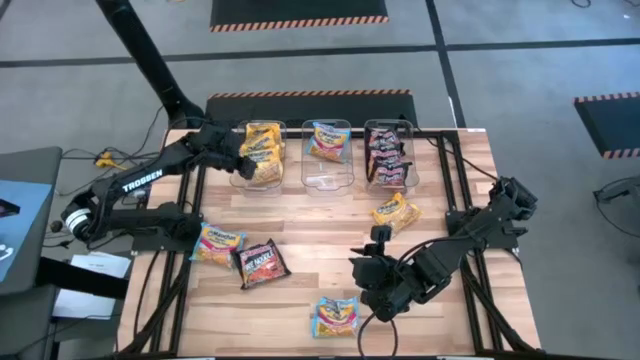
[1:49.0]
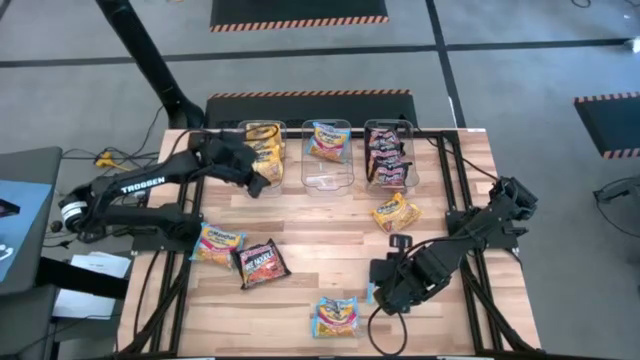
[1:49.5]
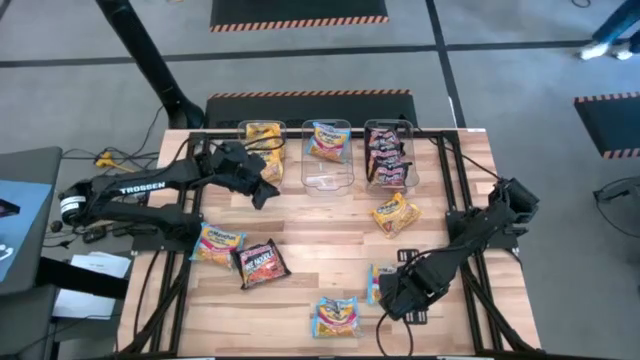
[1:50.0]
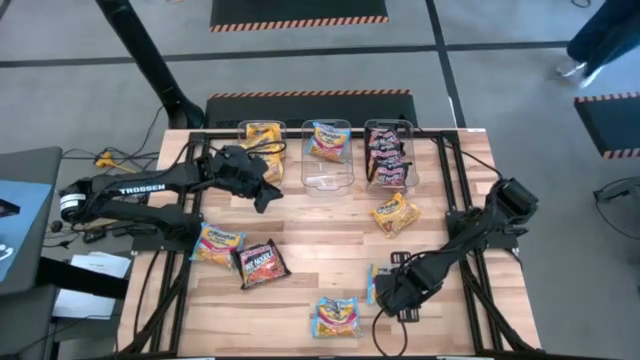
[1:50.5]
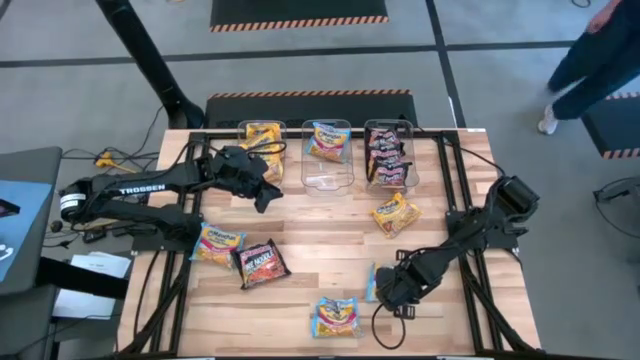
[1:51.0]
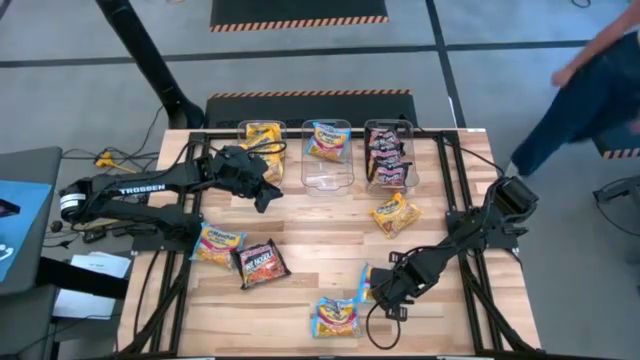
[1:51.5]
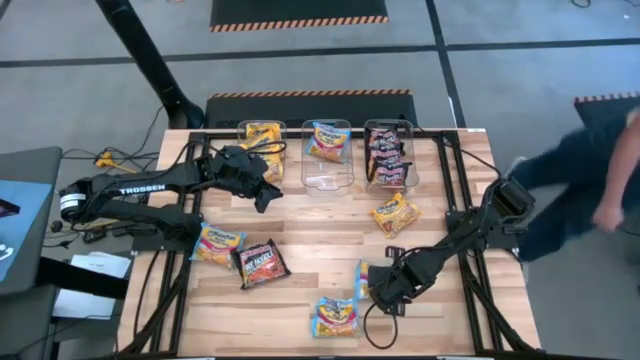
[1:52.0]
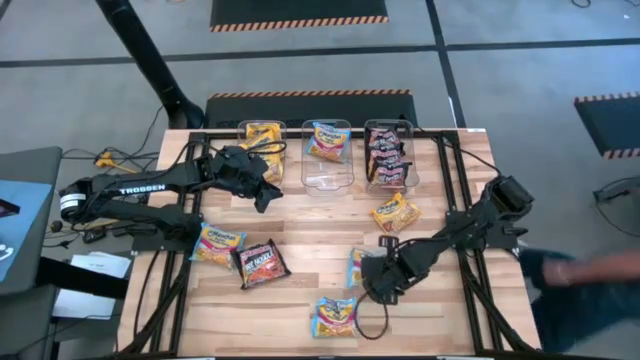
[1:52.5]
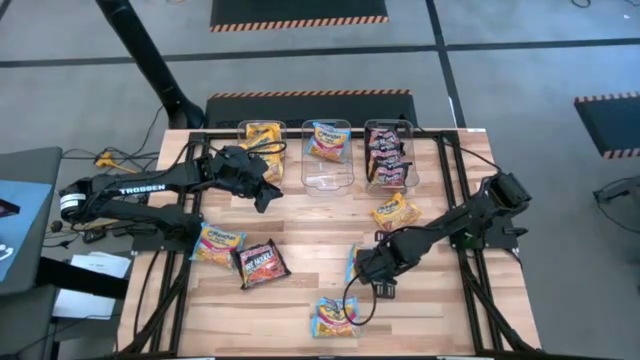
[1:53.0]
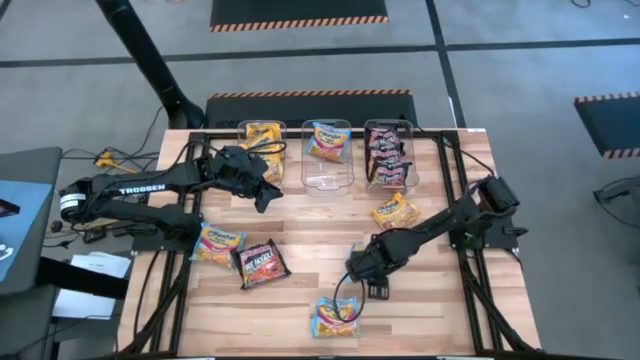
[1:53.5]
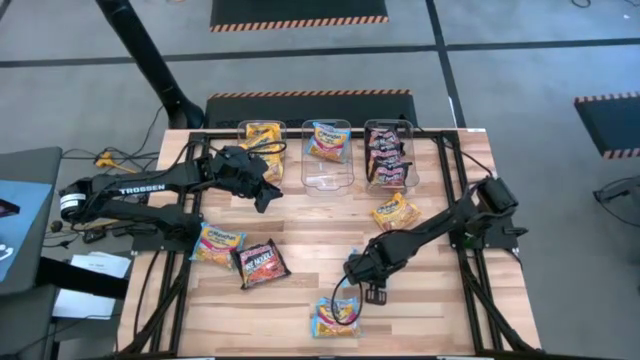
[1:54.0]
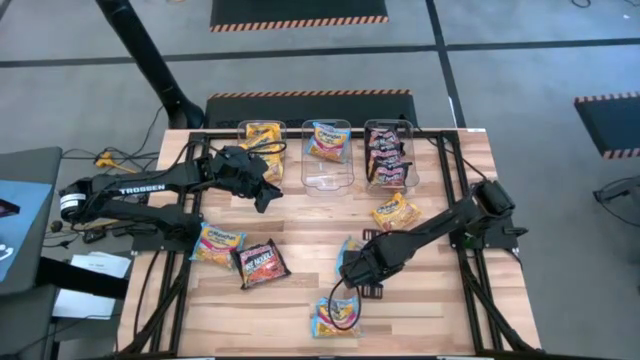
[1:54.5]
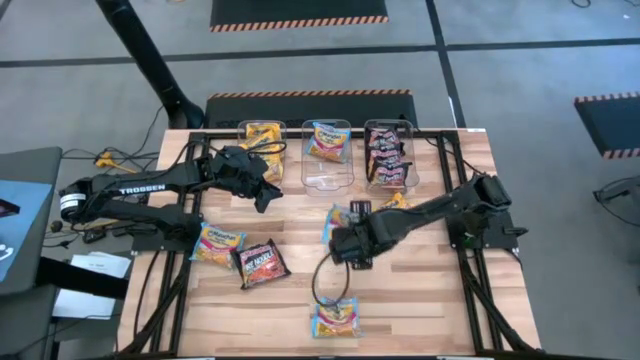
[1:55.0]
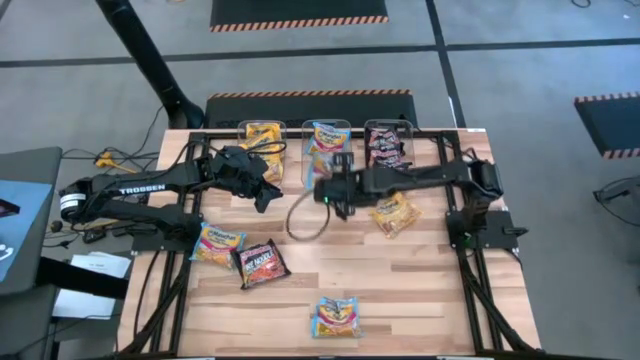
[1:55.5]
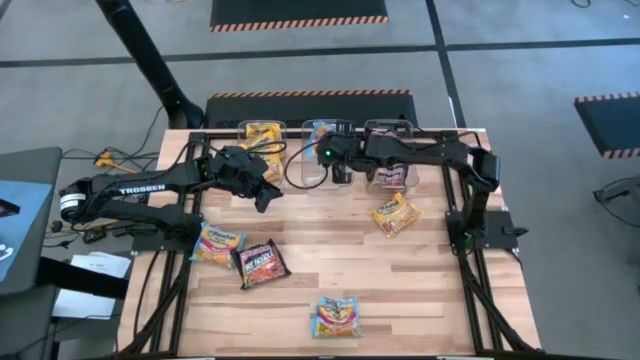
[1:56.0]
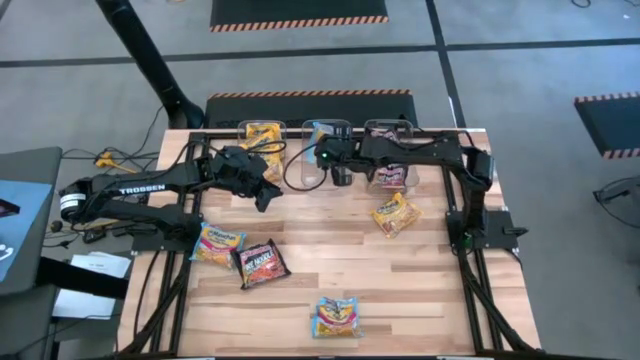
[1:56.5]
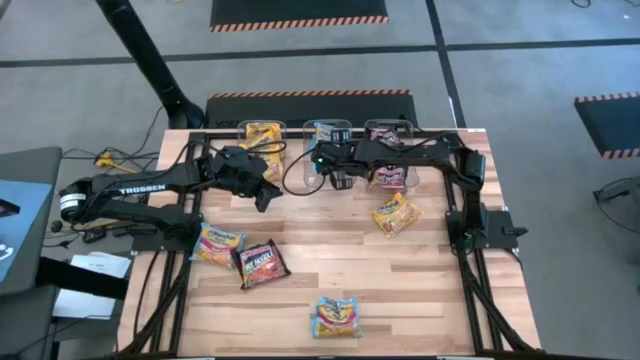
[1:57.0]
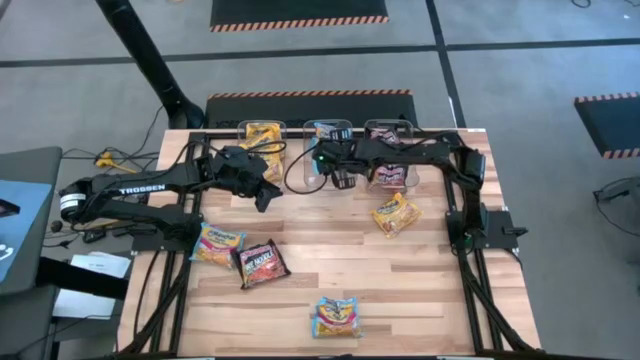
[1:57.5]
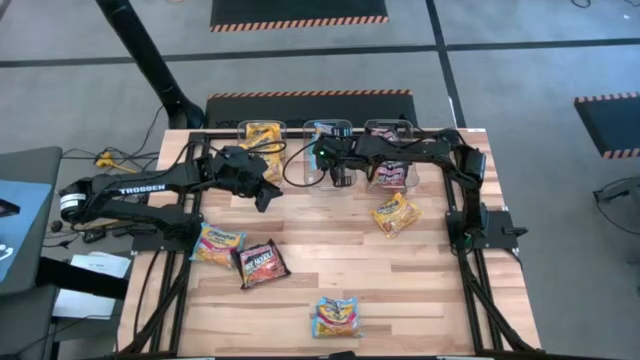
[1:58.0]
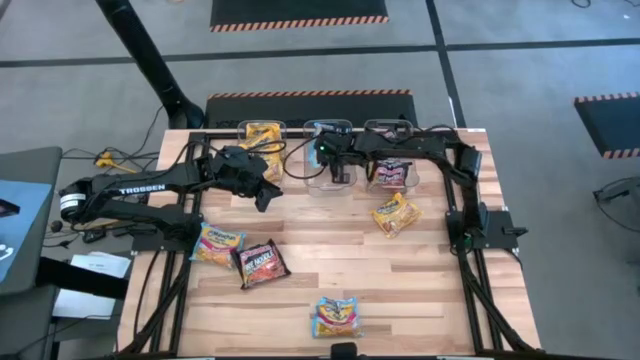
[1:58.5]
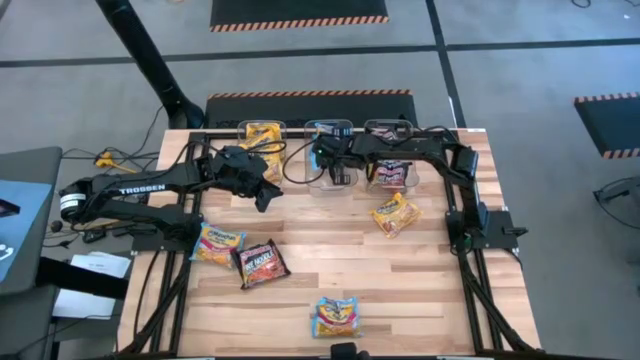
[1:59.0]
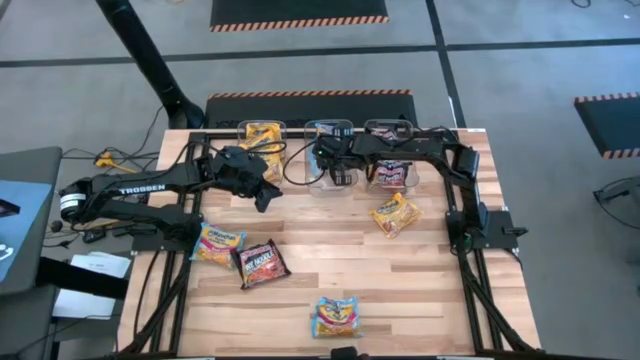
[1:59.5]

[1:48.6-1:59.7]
Task: Sort Maruchan noodles
Put the blue noodle pack into the middle transparent bin

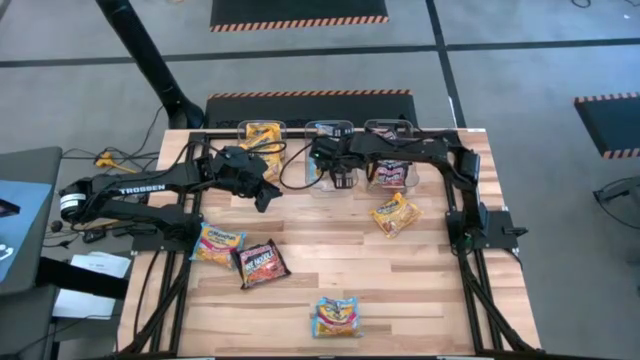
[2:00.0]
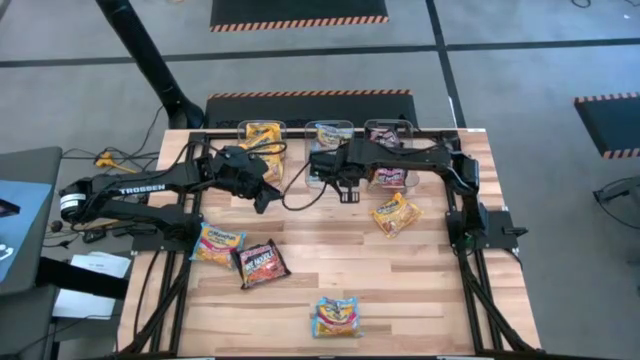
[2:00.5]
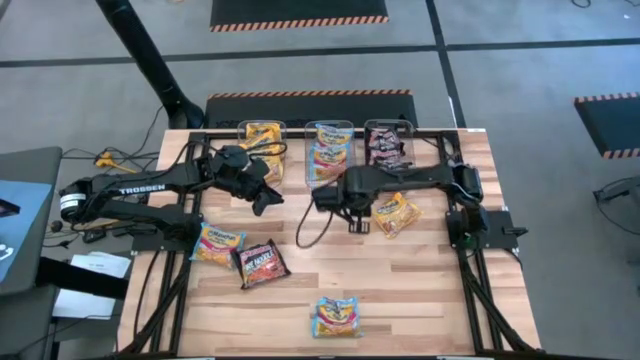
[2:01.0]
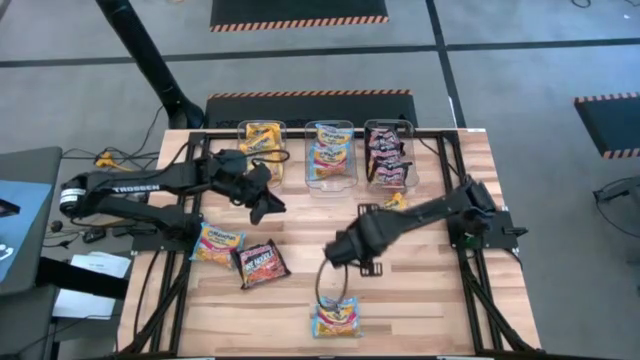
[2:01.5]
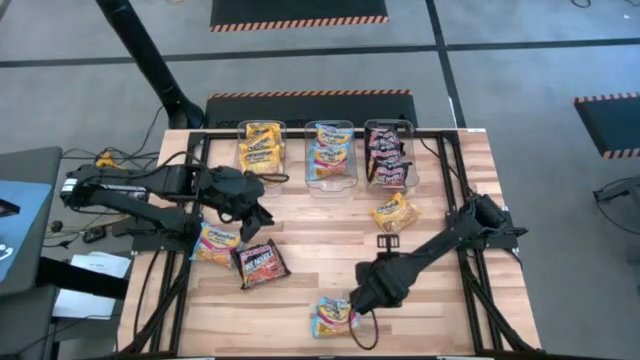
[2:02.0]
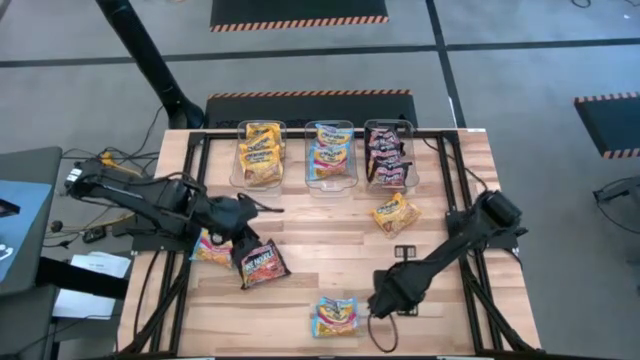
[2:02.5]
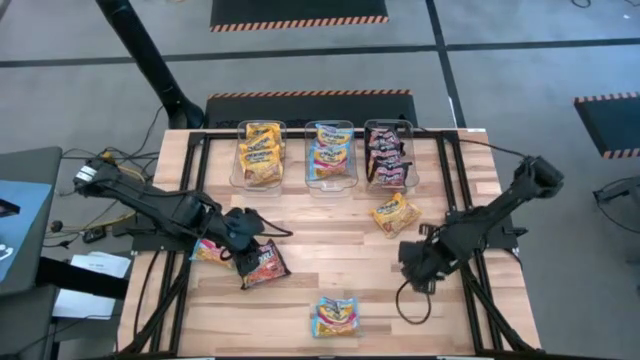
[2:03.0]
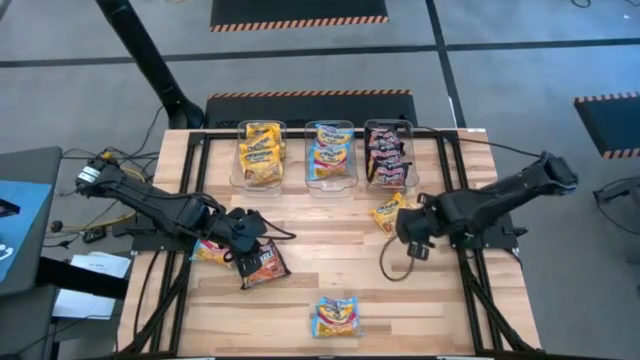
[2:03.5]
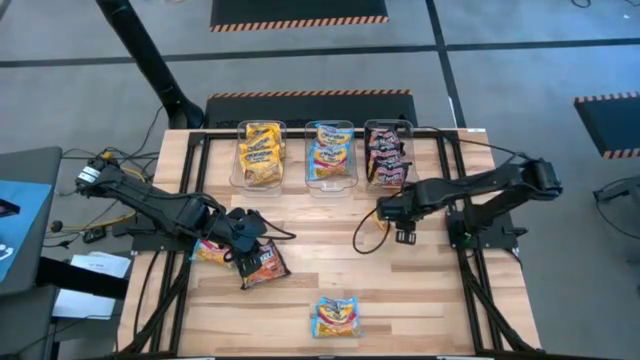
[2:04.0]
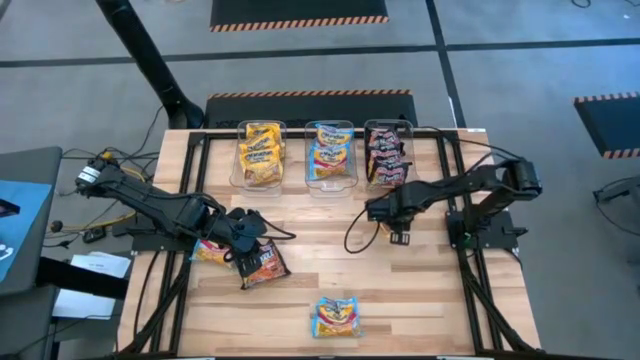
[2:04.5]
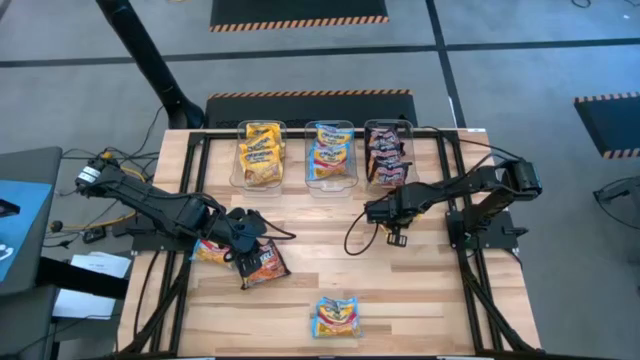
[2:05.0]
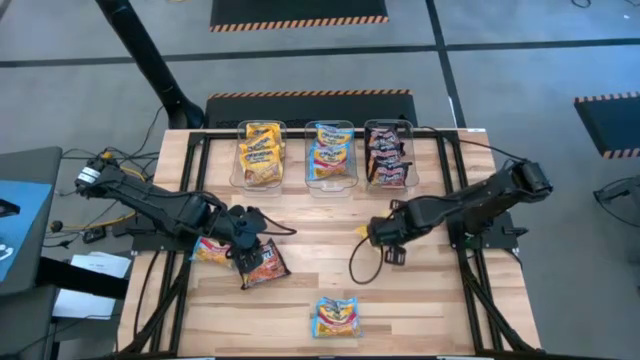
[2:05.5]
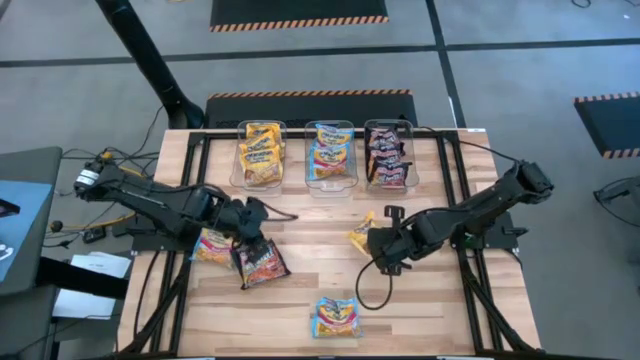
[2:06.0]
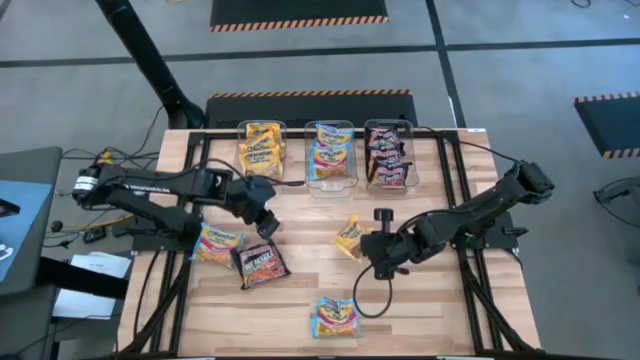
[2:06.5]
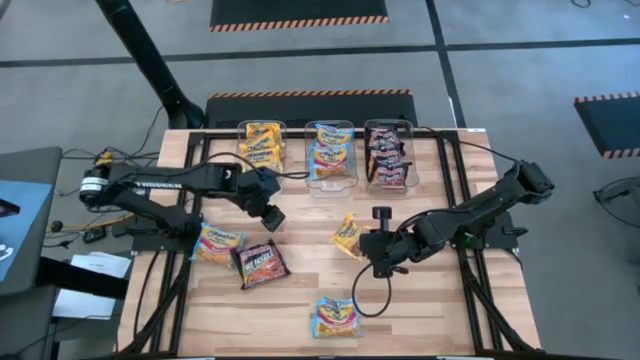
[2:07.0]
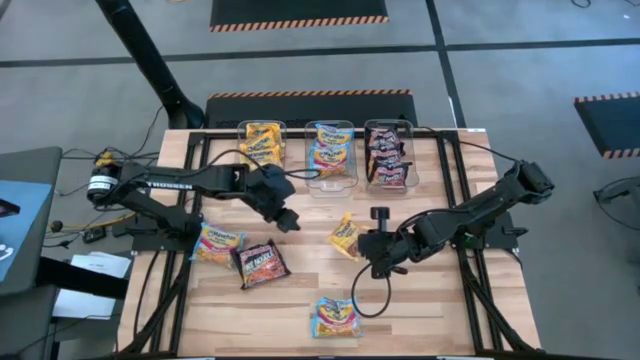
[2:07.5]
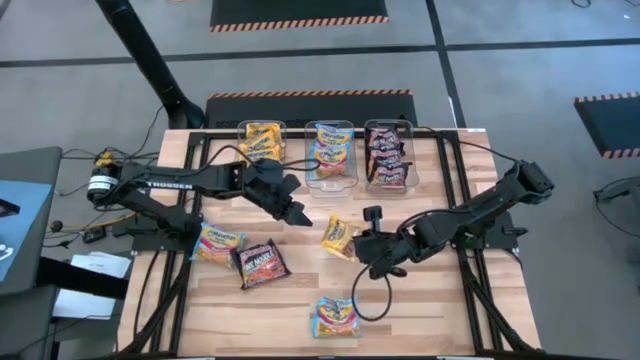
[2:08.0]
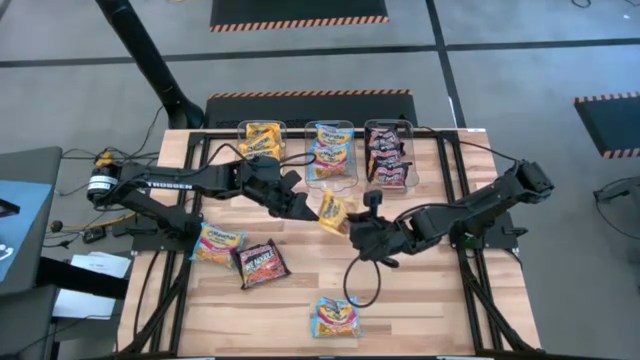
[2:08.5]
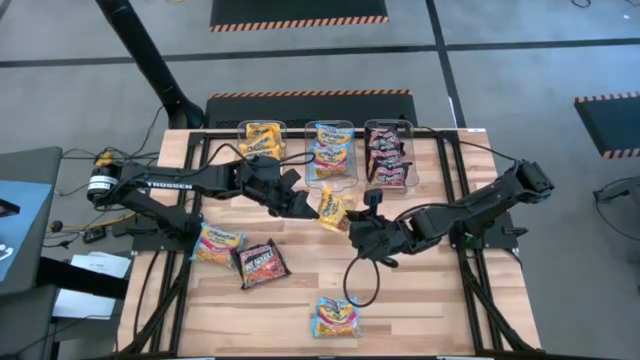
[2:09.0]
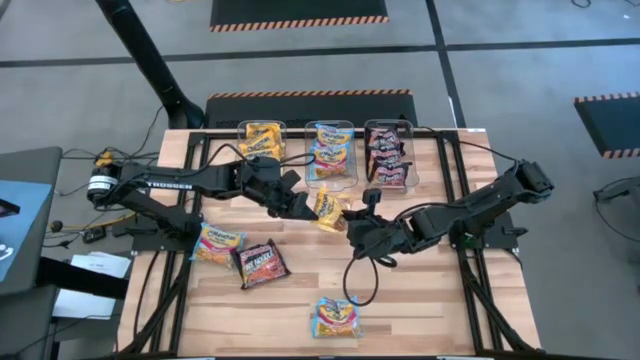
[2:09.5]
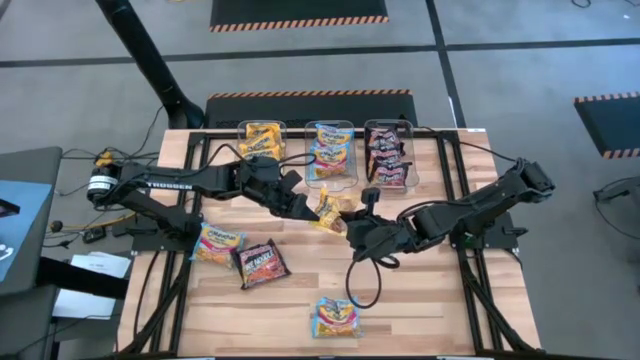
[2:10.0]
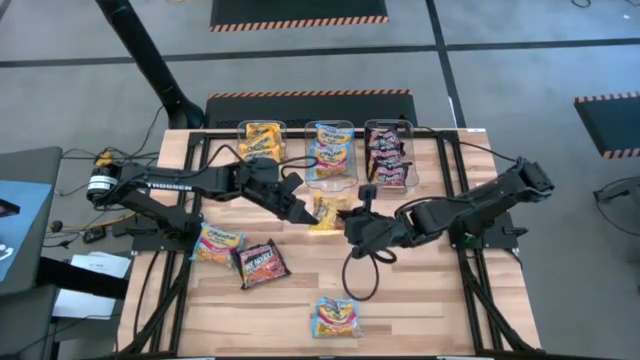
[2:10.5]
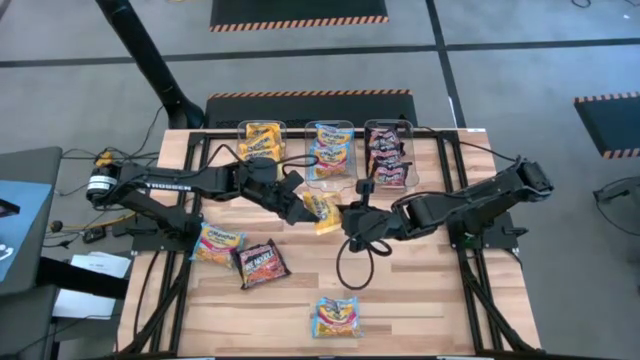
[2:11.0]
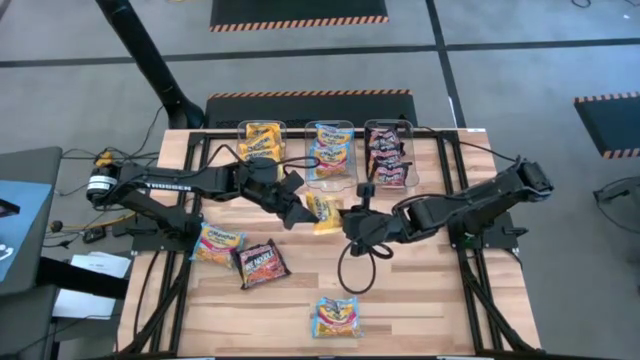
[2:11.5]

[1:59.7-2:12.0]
Put the yellow noodle pack into the left transparent bin
